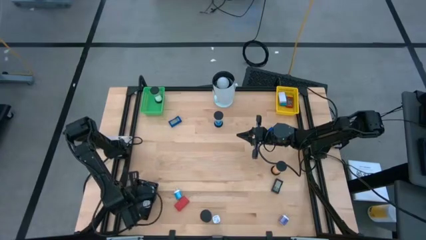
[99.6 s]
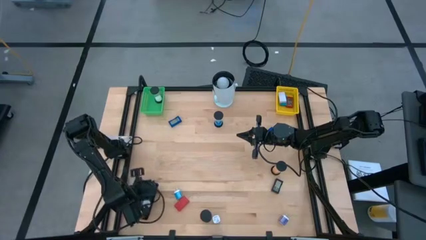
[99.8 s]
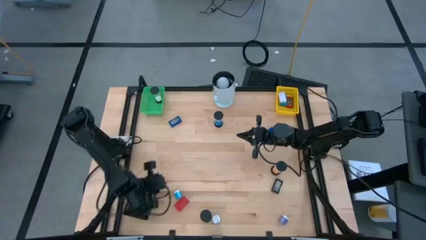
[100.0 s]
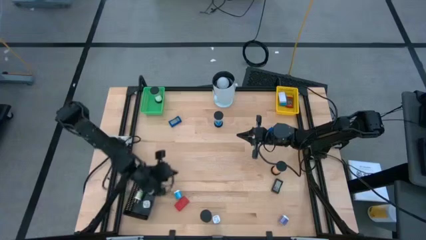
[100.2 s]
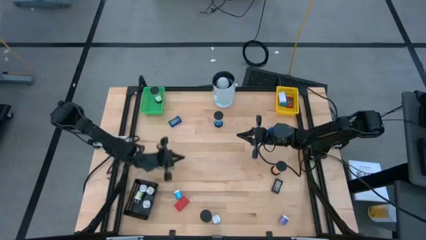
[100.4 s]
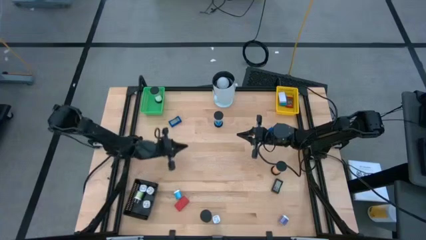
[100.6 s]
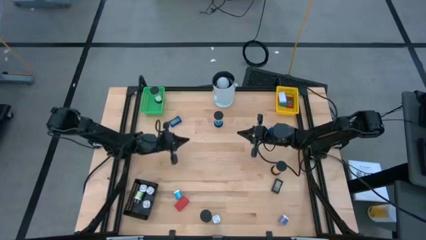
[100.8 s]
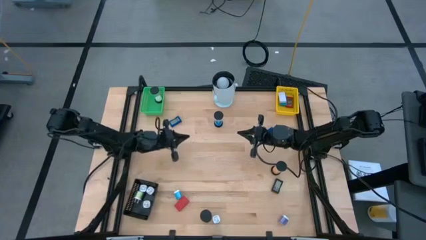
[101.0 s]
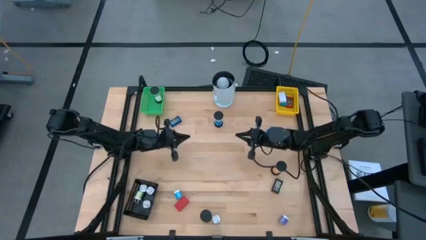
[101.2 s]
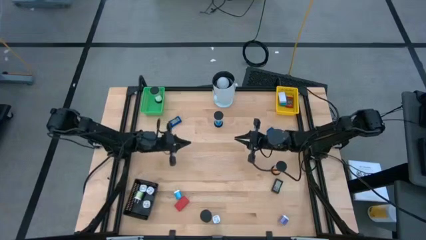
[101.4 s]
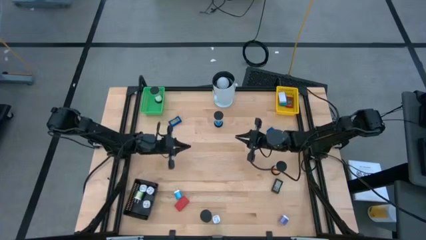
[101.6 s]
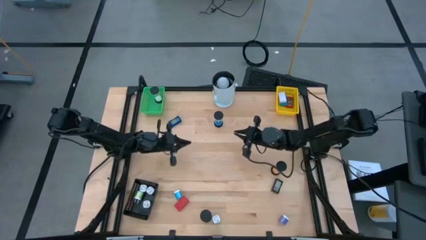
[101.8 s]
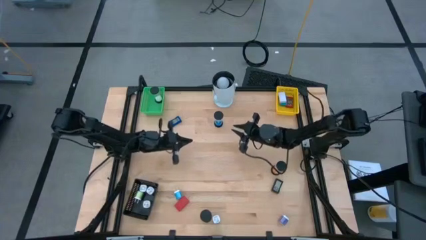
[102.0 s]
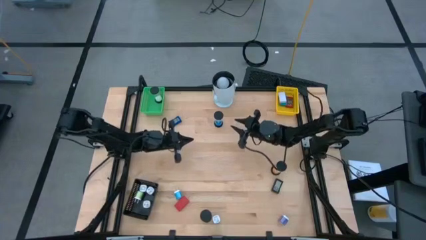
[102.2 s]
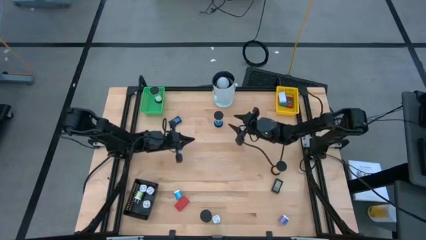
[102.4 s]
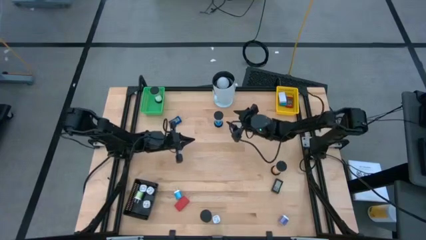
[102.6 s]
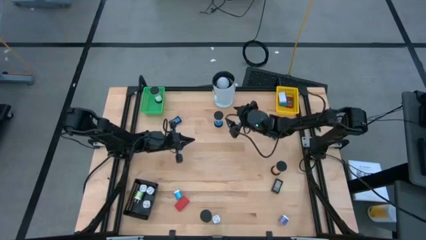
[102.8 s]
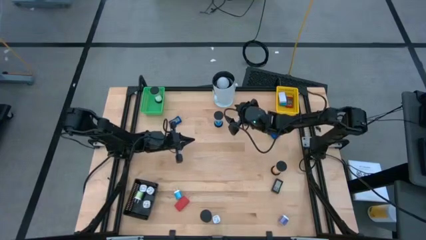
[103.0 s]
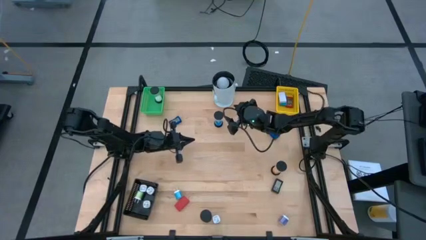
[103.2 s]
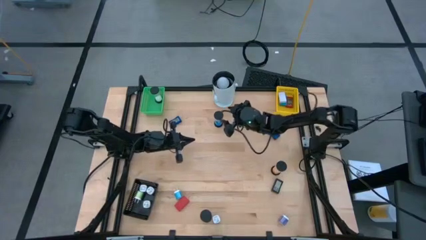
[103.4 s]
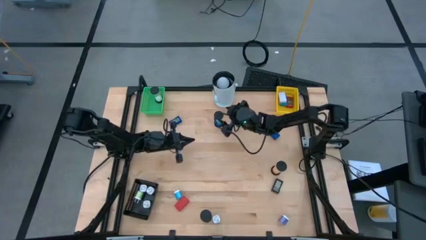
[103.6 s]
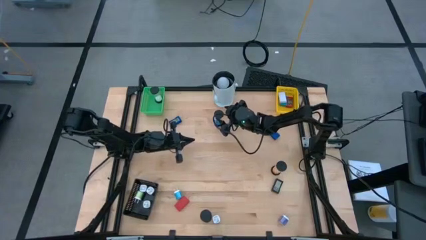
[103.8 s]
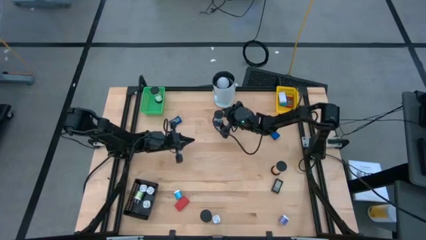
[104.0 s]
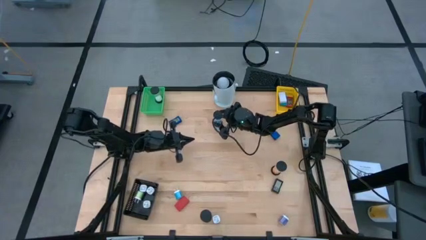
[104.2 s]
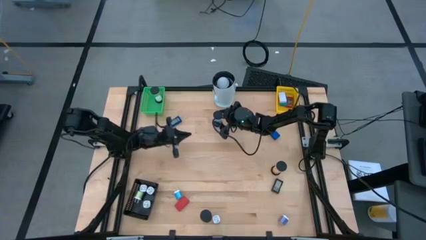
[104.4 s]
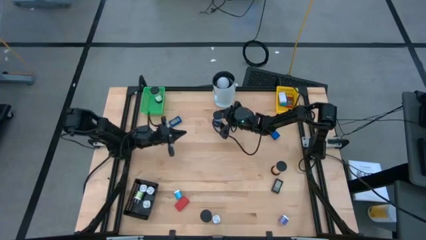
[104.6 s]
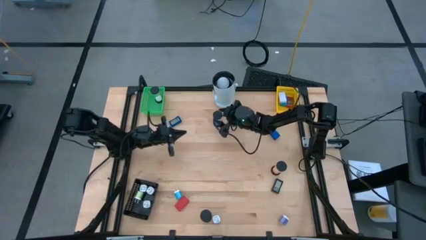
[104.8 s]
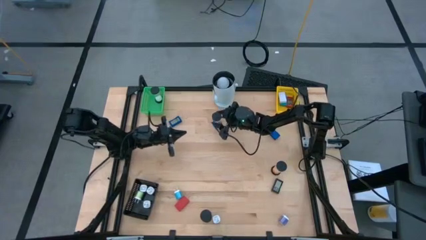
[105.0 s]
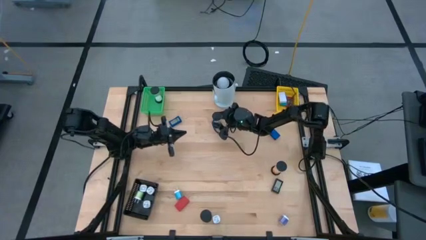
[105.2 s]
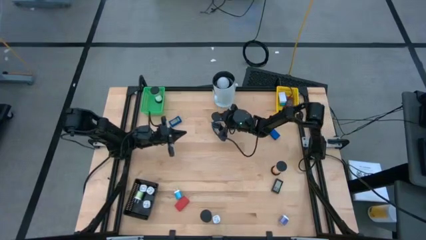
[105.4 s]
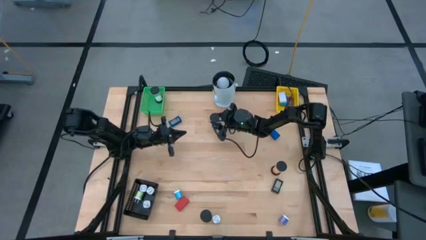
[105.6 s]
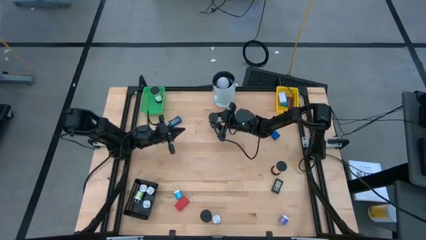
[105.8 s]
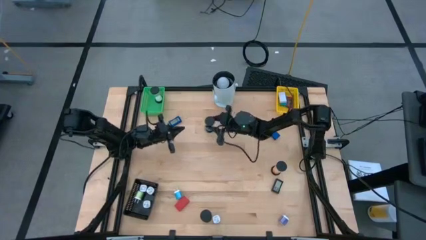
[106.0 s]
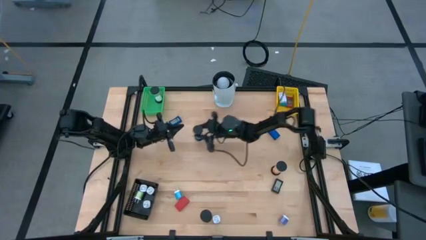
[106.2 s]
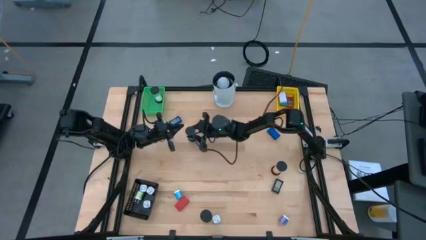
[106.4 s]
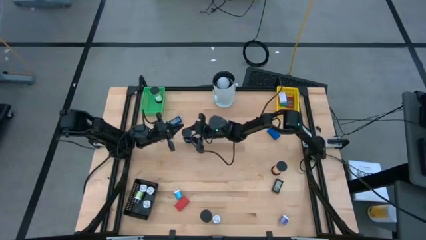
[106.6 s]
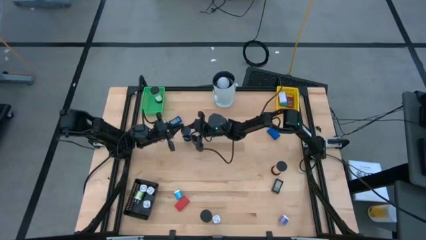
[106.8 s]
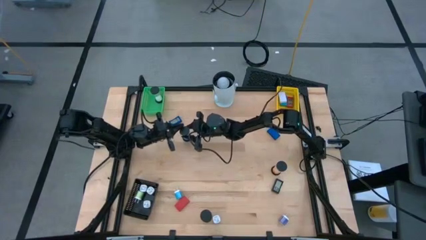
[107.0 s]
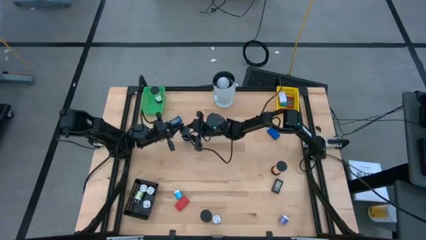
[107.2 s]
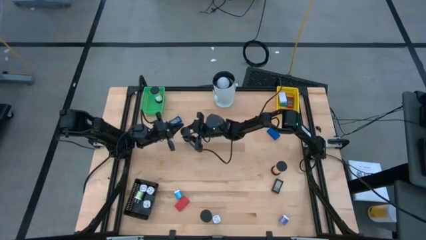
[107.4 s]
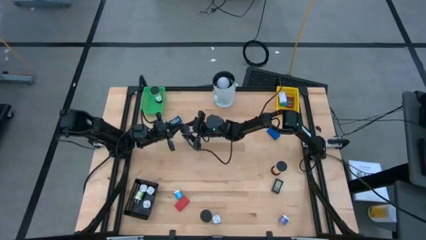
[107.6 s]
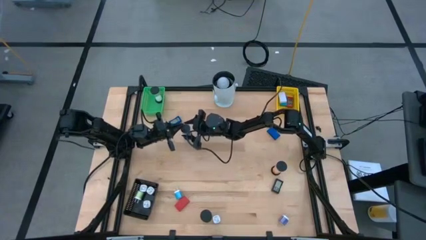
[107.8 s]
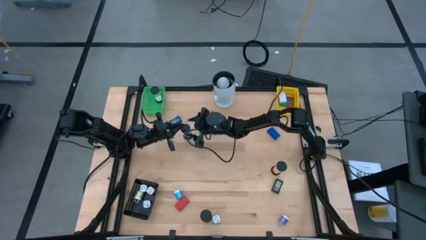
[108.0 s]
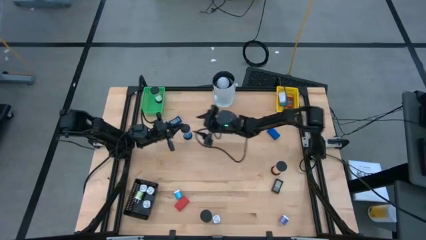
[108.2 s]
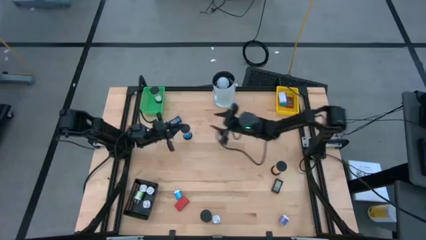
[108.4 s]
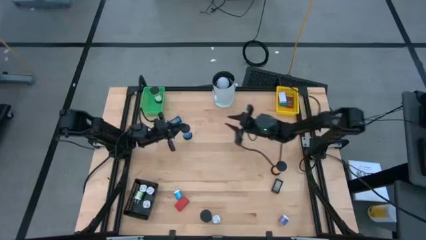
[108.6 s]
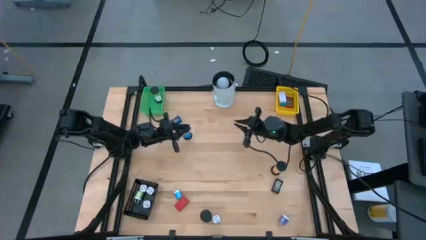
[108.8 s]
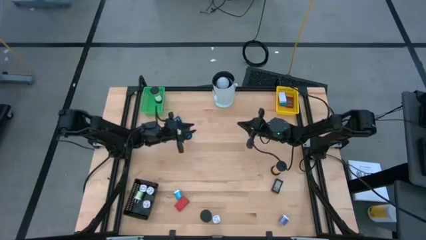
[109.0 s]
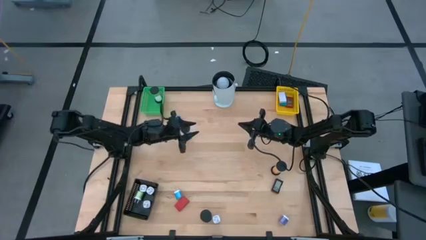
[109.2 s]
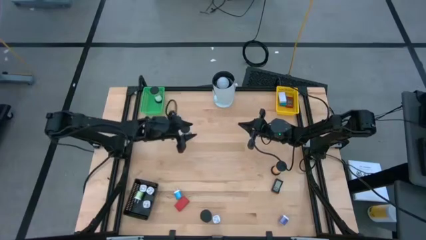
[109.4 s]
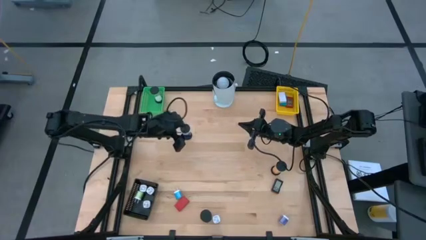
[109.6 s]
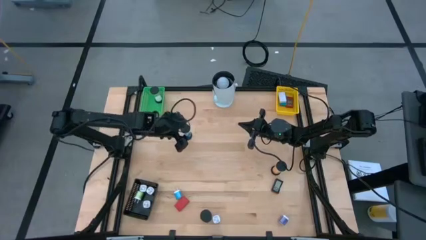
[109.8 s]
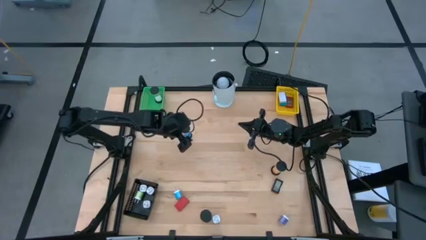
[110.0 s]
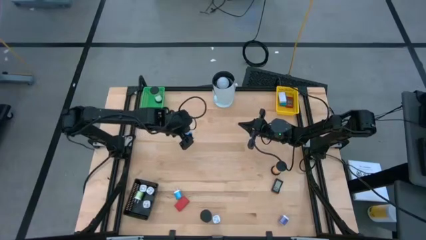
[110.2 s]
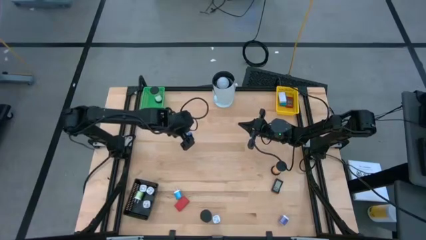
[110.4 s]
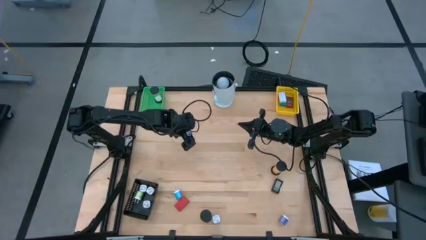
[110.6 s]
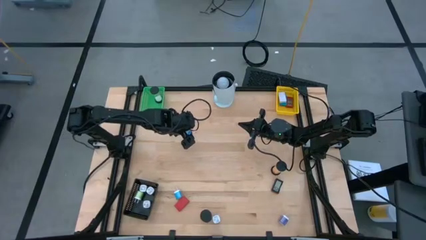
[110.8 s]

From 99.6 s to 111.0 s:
Task: Pick & Place Office items
Put the blue hourglass timer into the green bin
